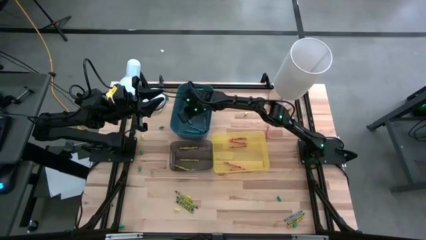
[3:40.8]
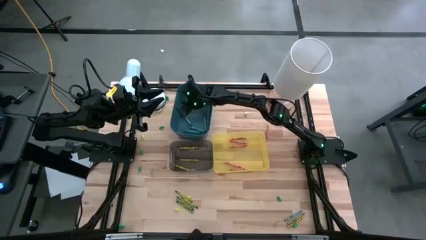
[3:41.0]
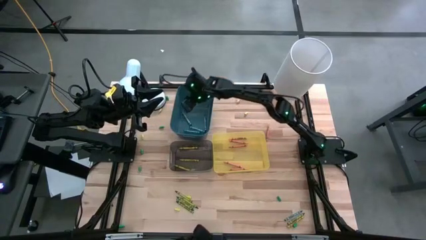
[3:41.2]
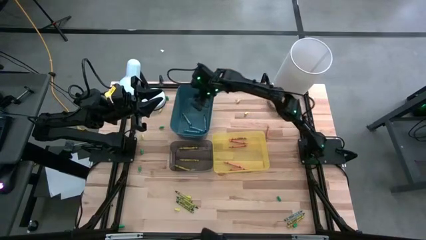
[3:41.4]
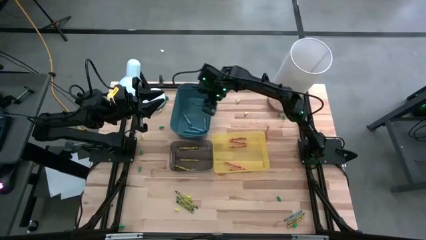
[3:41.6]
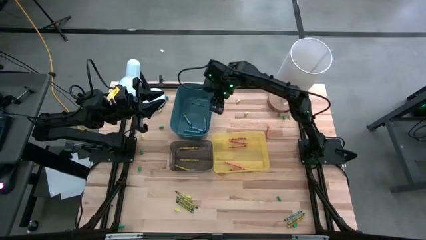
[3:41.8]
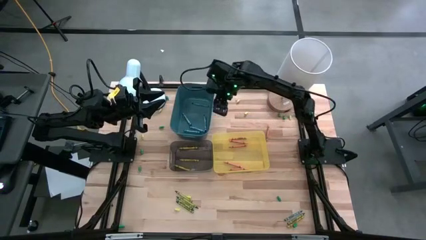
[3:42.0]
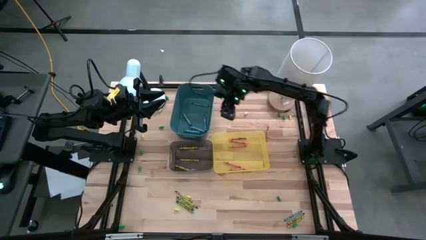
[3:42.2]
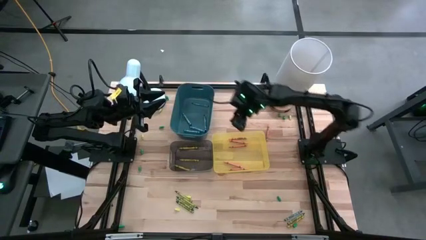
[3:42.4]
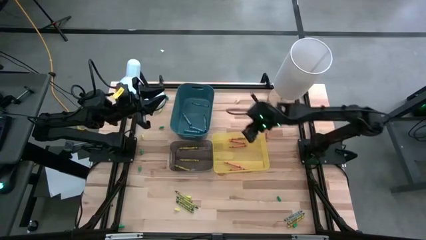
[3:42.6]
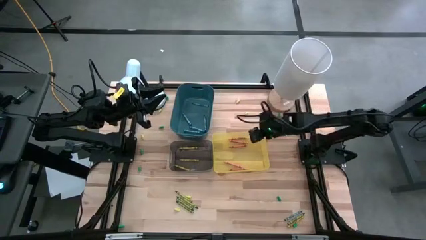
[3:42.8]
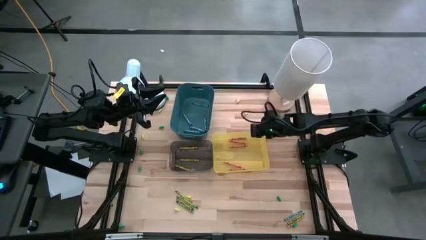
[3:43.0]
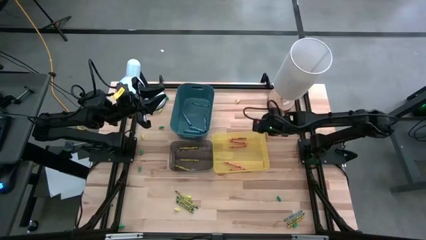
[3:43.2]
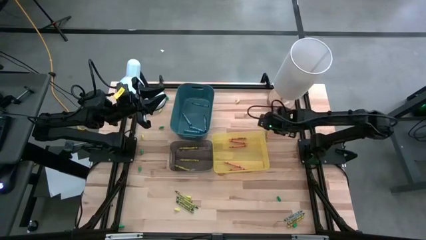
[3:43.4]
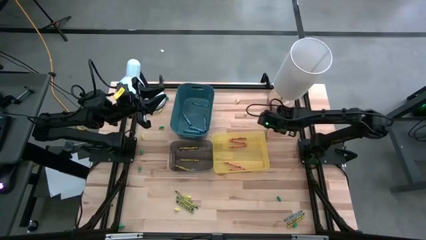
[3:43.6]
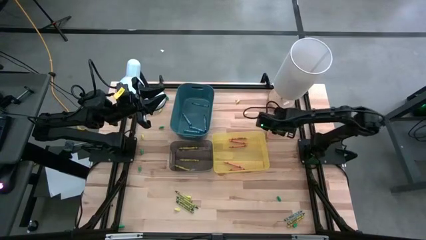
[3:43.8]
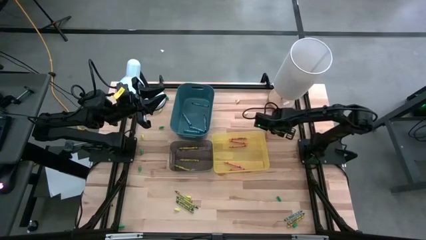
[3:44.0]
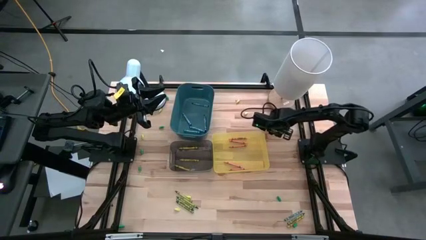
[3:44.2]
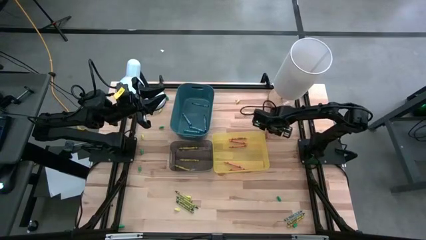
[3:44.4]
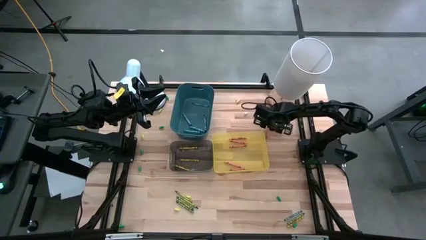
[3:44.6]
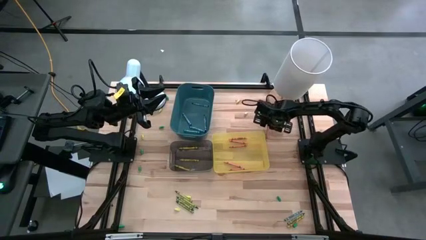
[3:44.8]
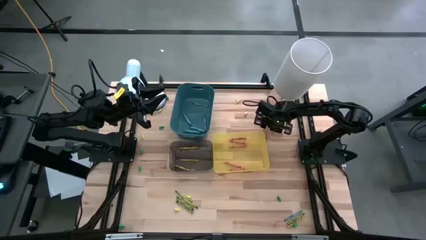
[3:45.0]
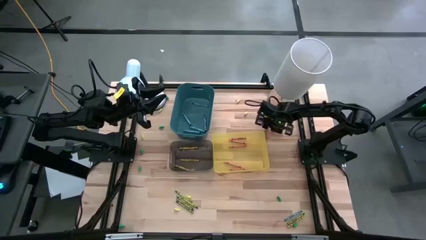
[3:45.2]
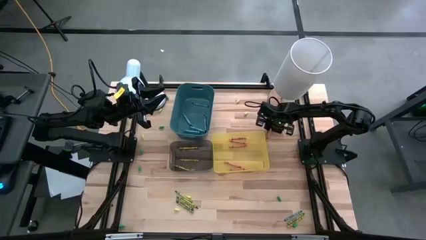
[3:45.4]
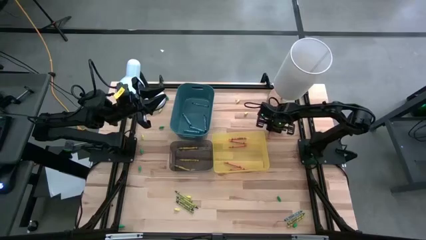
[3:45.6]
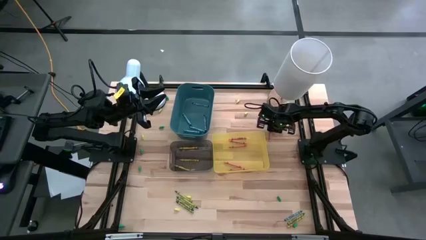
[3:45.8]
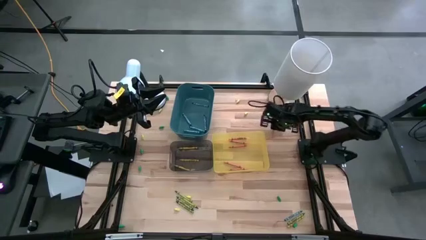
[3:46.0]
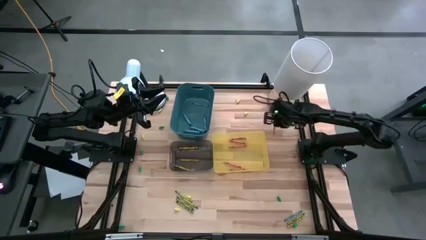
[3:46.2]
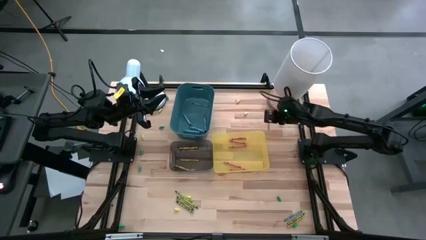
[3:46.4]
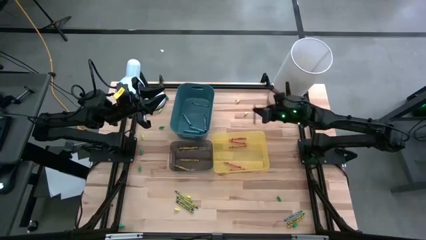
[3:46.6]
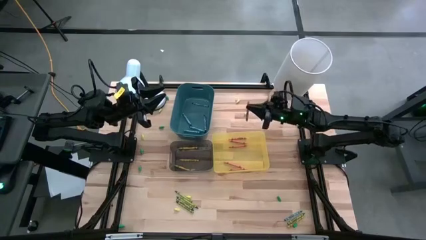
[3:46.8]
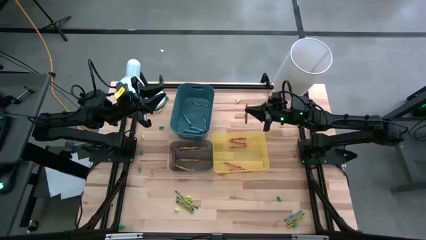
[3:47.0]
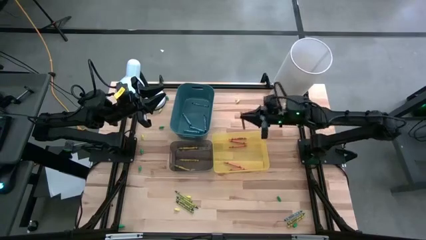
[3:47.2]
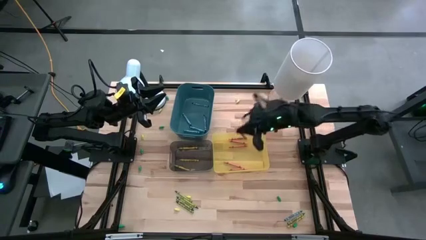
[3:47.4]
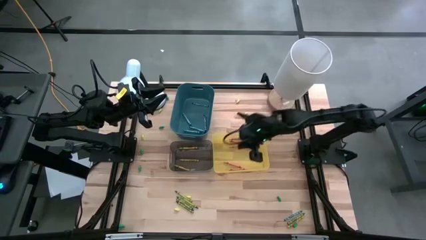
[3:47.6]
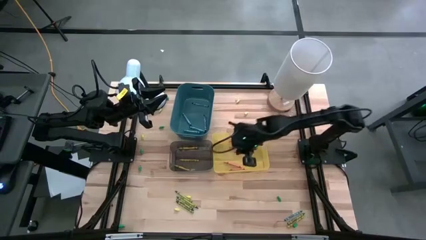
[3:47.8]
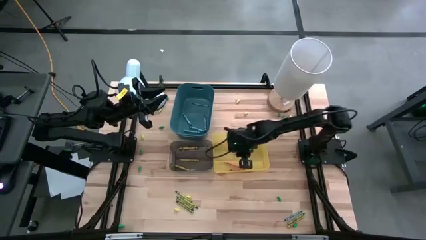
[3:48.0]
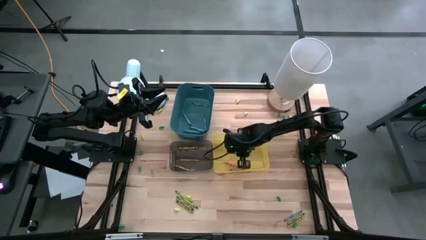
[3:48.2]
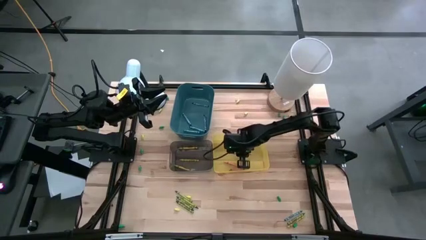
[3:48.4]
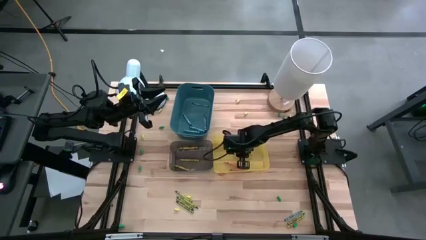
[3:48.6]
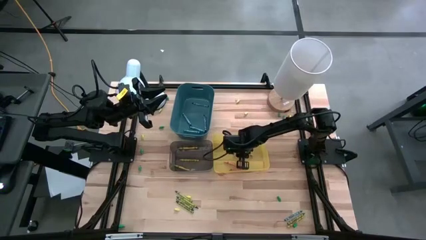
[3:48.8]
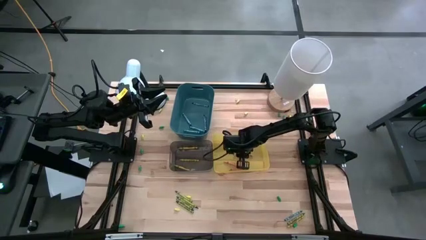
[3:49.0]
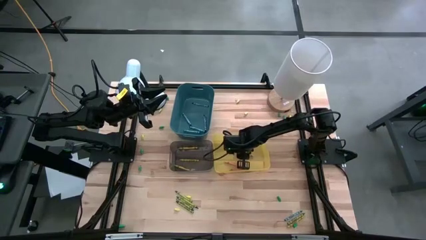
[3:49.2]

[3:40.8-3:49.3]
Task: Sort crayons
Put the orange crayon into the yellow bin

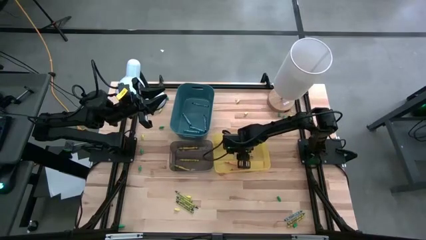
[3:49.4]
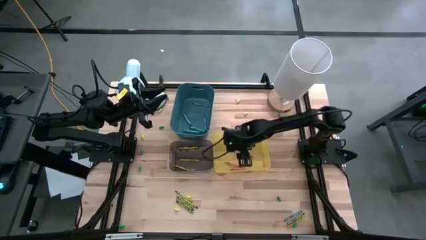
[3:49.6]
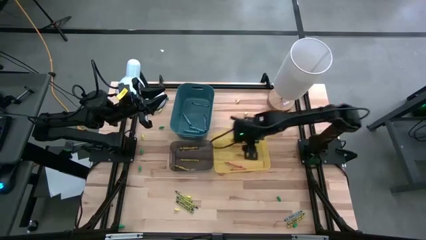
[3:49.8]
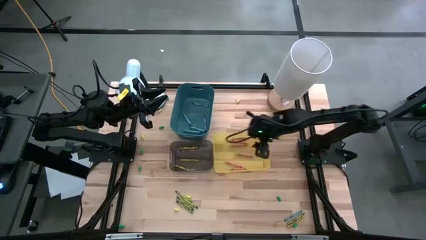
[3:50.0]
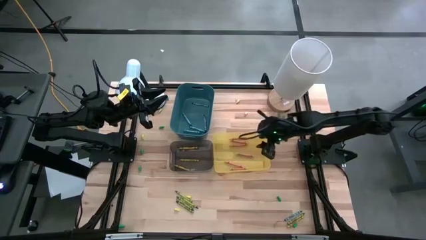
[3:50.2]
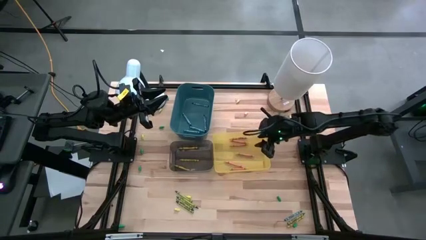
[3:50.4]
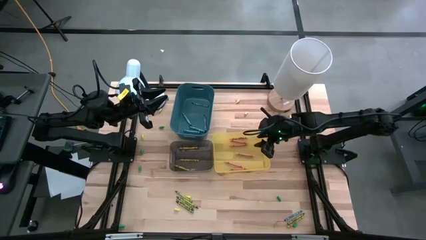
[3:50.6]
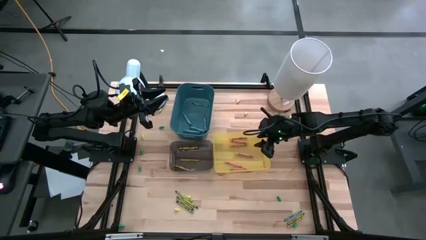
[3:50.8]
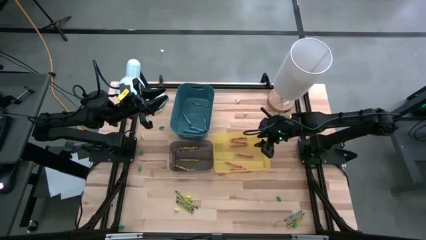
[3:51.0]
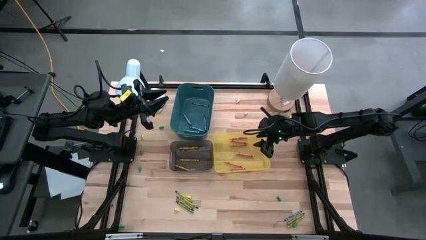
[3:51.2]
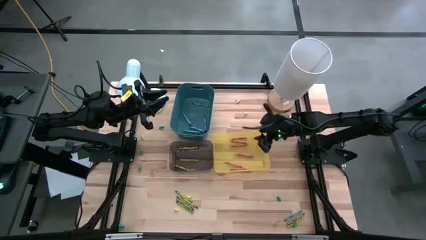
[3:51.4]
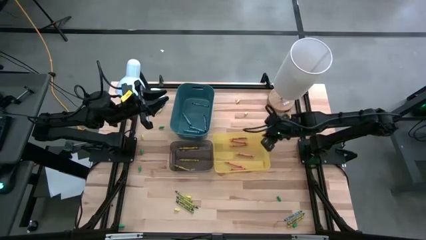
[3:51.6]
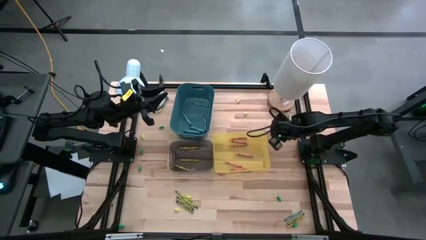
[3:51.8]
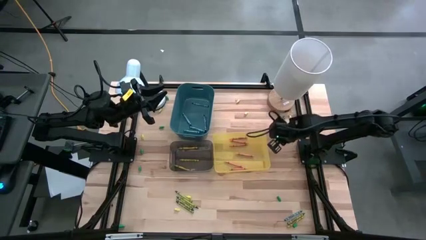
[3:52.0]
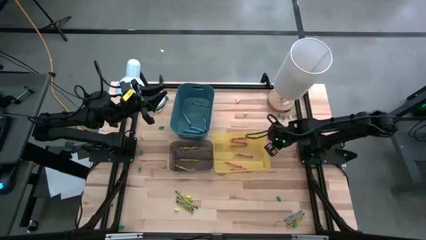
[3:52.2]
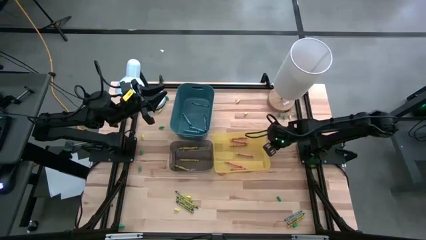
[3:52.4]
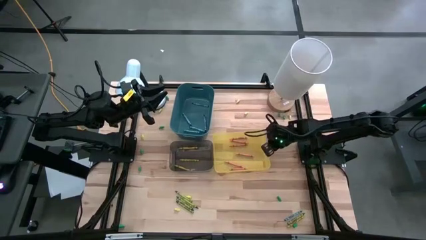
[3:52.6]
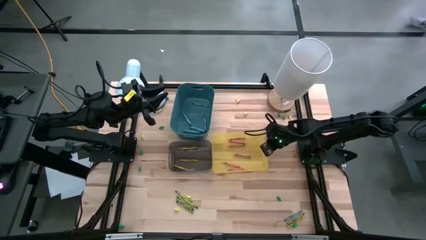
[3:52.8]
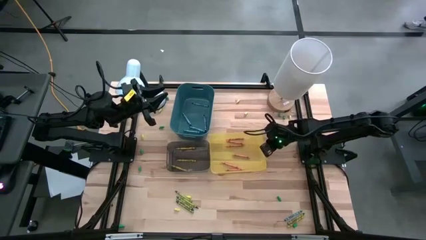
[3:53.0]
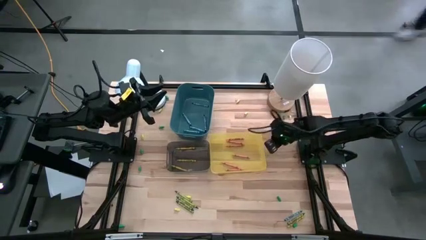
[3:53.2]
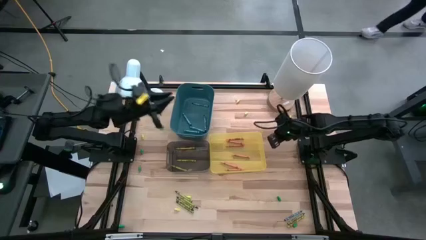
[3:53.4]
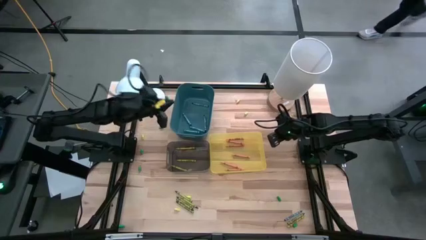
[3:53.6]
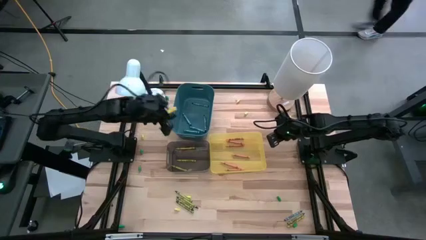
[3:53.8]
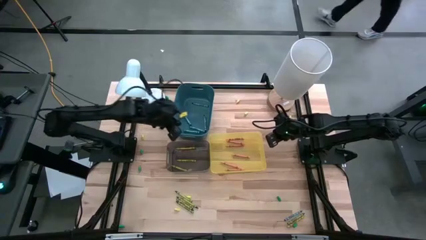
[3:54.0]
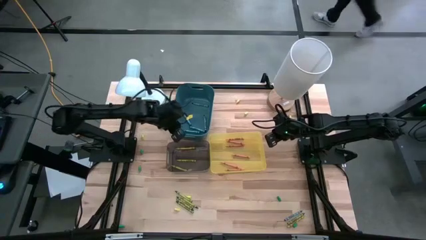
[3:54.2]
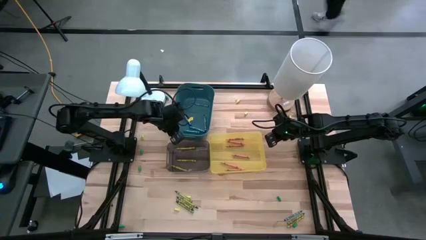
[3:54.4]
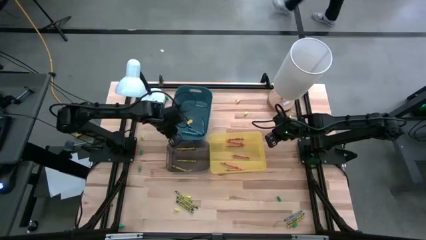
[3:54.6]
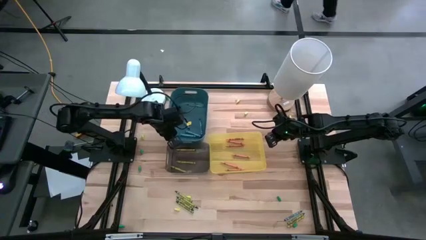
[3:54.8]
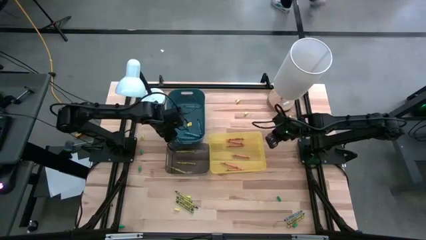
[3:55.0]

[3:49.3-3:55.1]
Adjust the bins

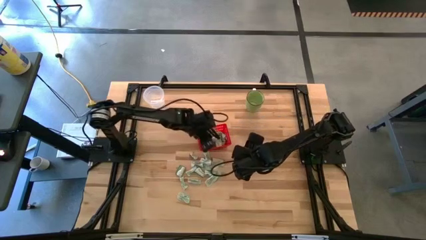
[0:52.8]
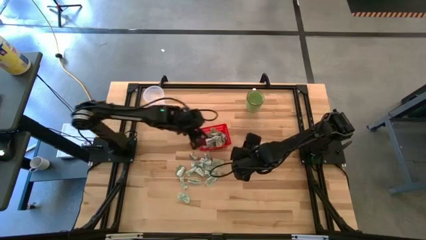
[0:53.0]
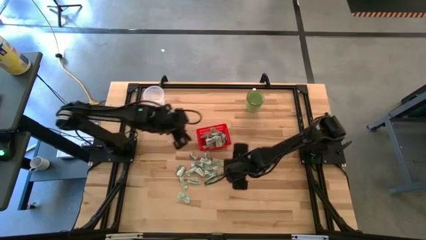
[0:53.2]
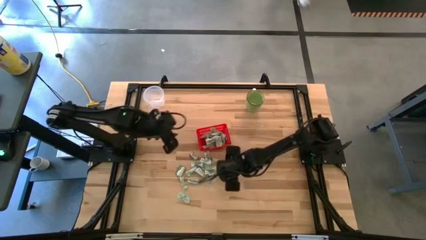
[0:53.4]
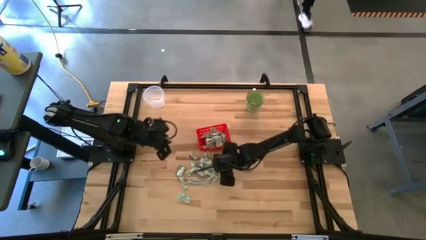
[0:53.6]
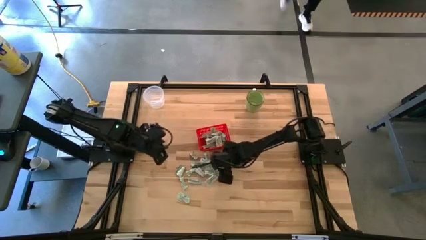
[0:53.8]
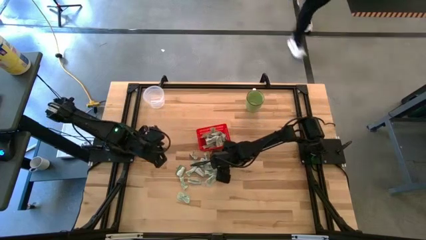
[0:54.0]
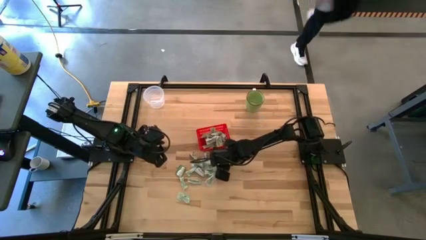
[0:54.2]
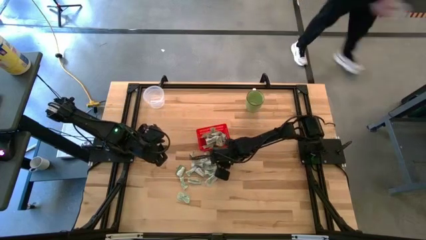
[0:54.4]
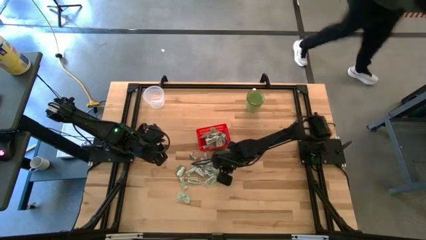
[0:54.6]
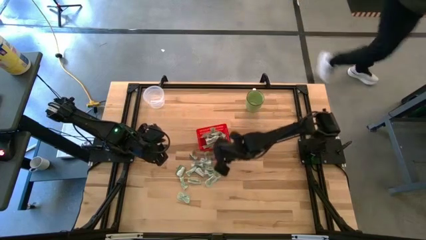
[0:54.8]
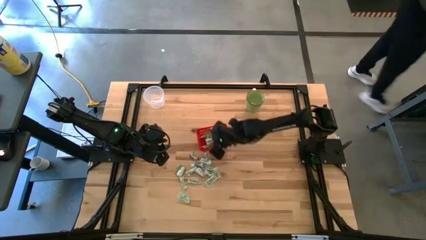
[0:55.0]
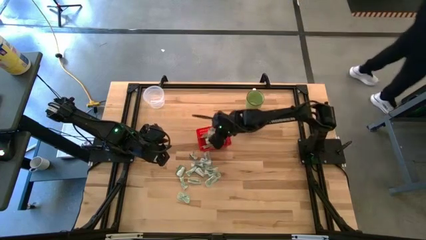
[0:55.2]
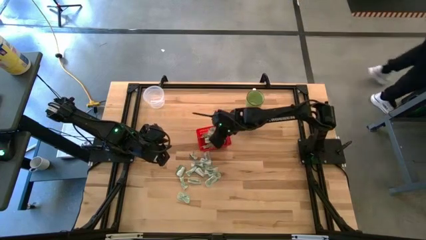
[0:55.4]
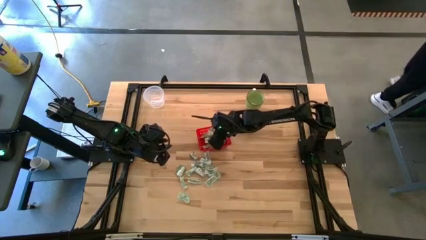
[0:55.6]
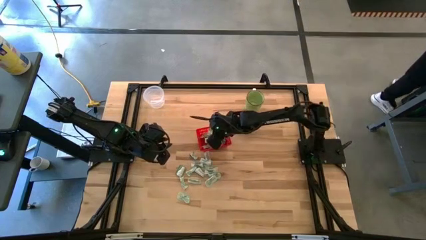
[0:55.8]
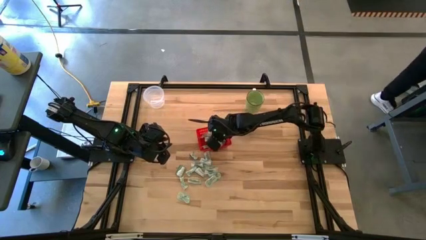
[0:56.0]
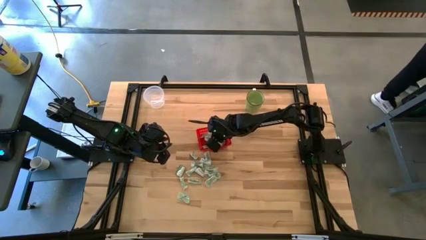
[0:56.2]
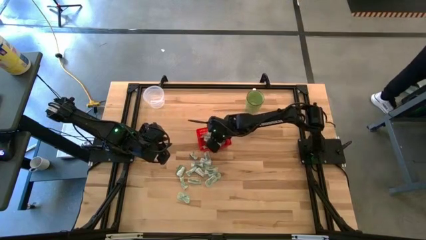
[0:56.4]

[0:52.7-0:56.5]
Task: Pick and place Stevia / Truvia into bins
Put the stevia packet into the red basket
